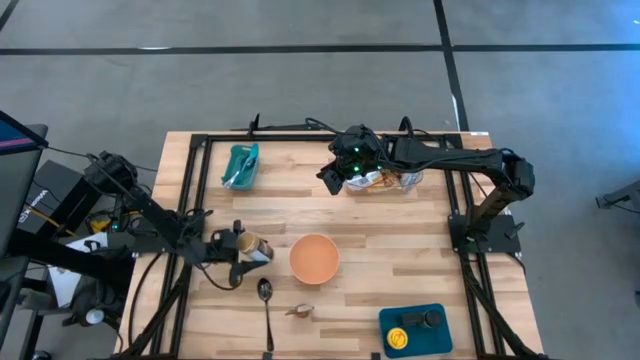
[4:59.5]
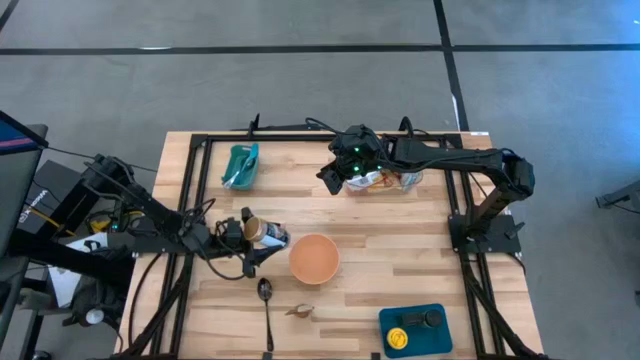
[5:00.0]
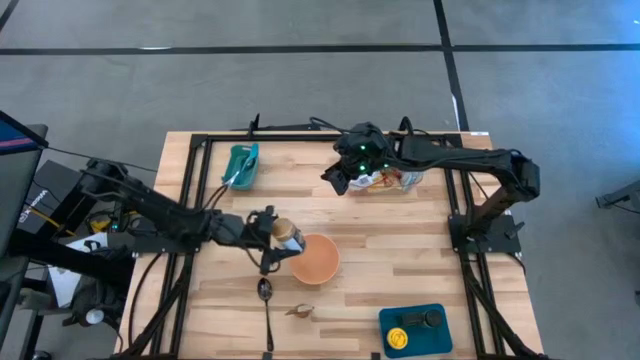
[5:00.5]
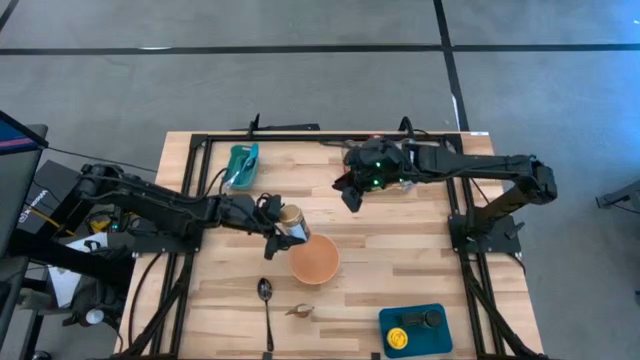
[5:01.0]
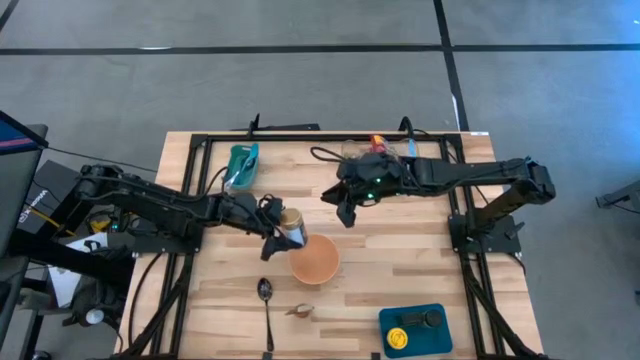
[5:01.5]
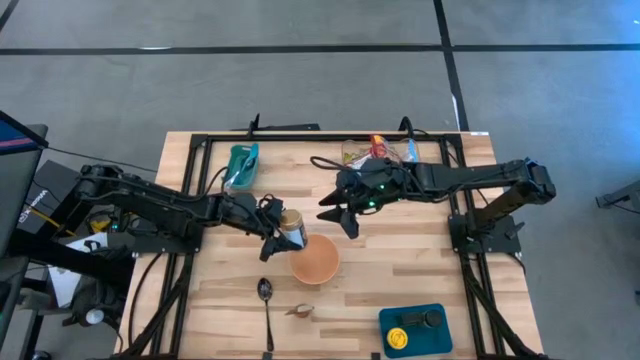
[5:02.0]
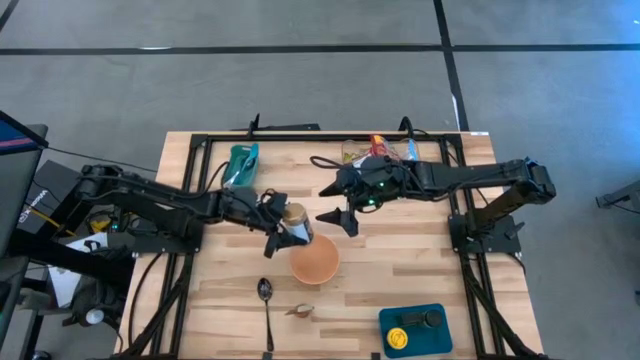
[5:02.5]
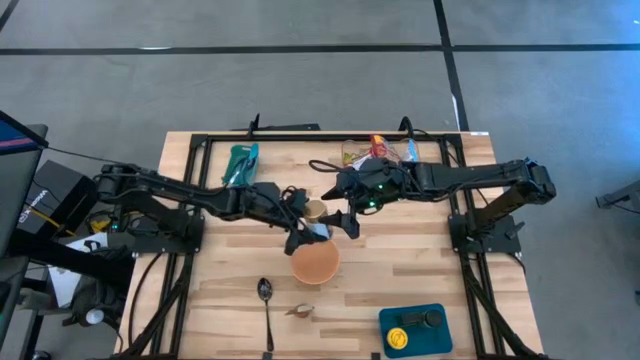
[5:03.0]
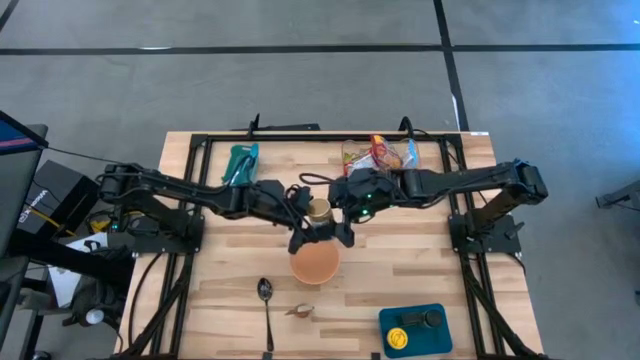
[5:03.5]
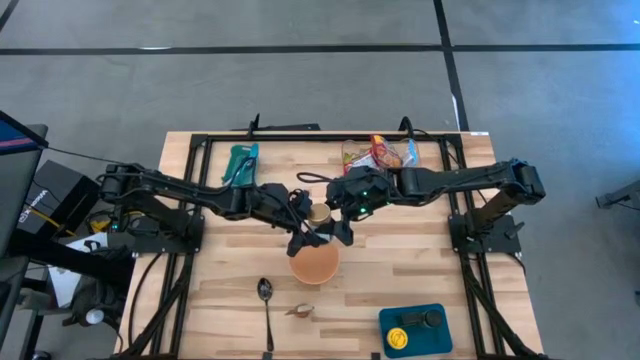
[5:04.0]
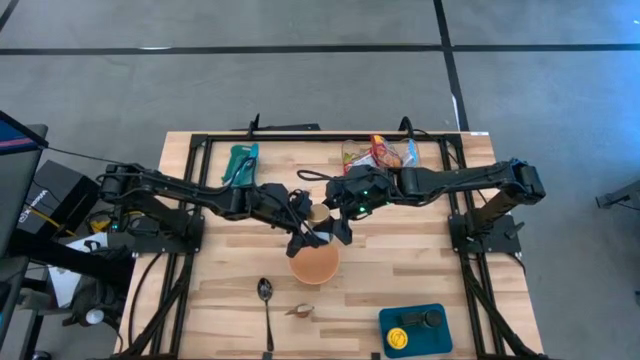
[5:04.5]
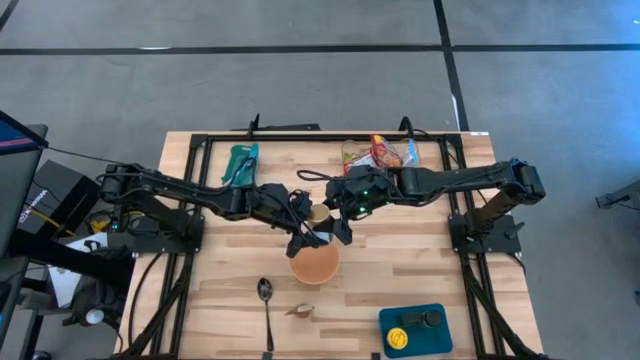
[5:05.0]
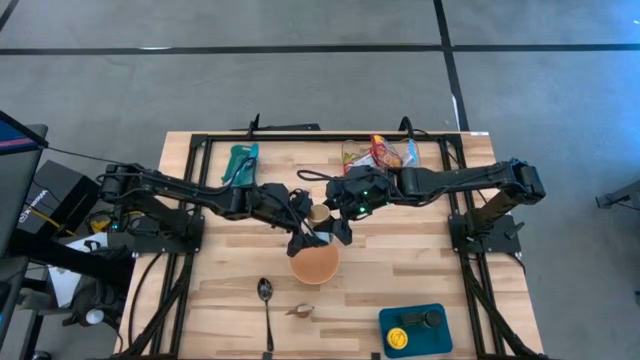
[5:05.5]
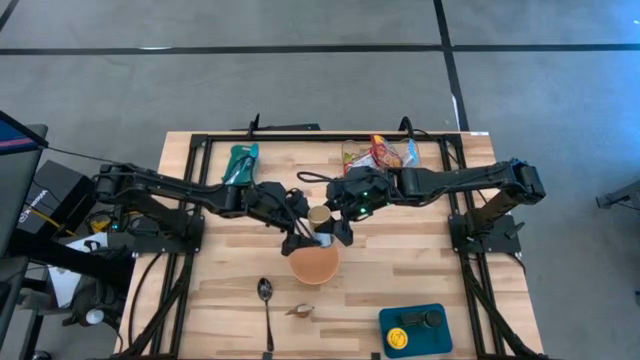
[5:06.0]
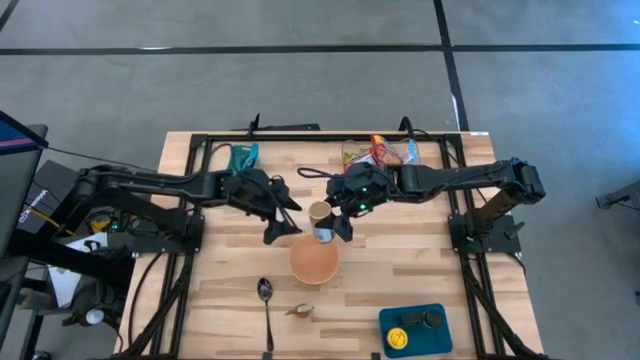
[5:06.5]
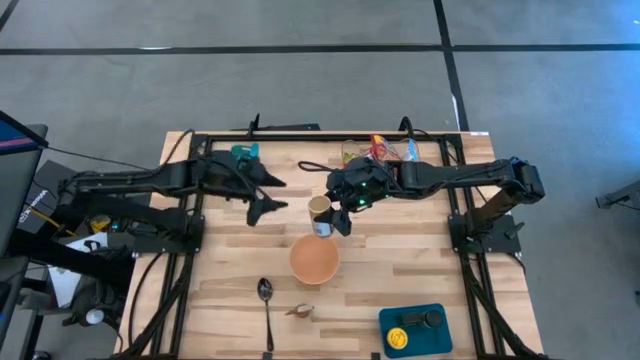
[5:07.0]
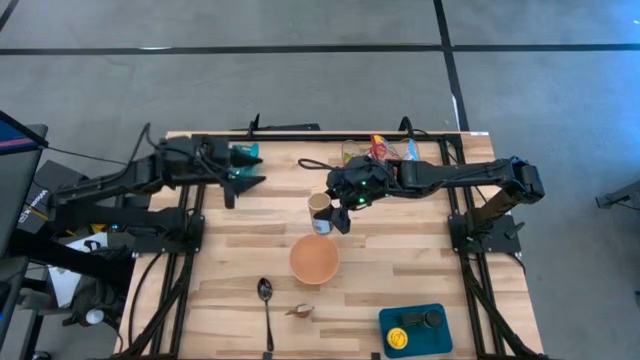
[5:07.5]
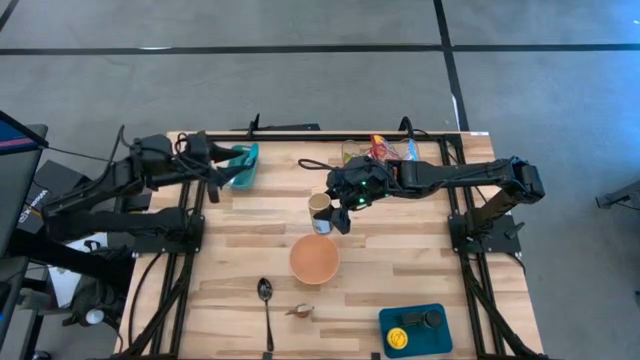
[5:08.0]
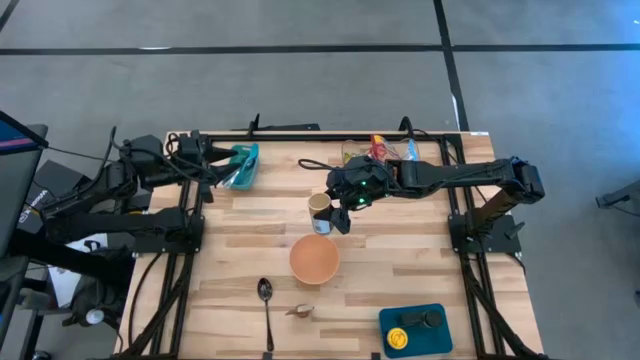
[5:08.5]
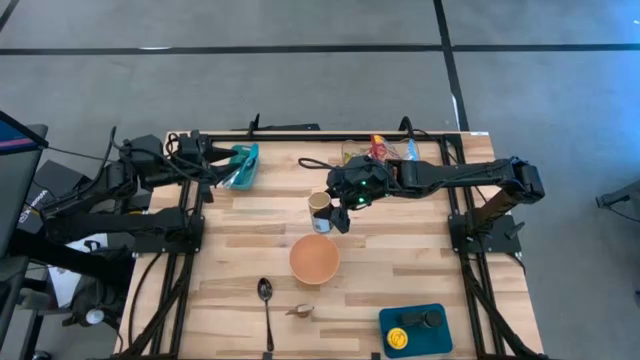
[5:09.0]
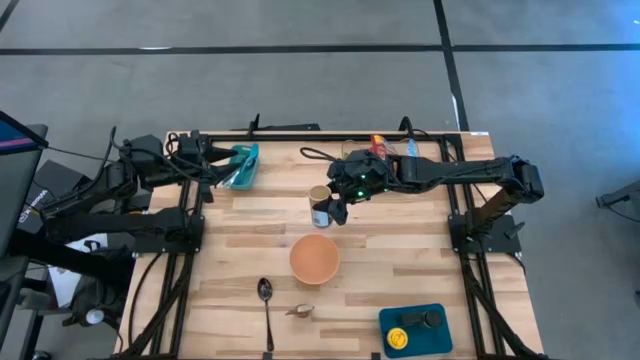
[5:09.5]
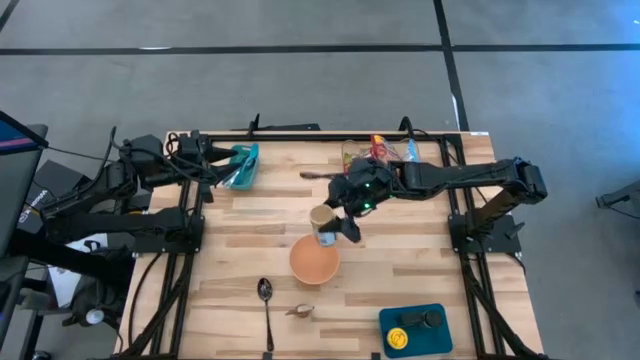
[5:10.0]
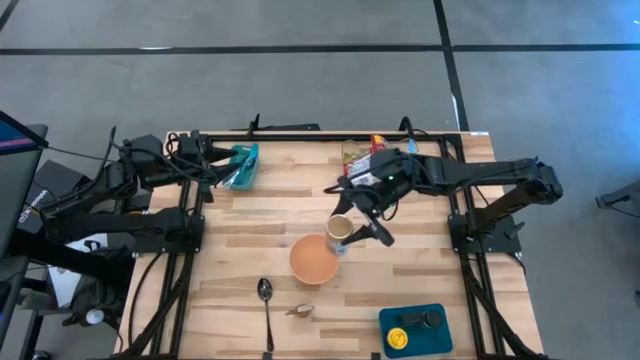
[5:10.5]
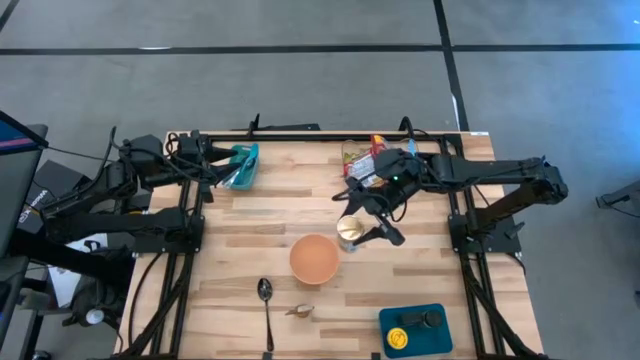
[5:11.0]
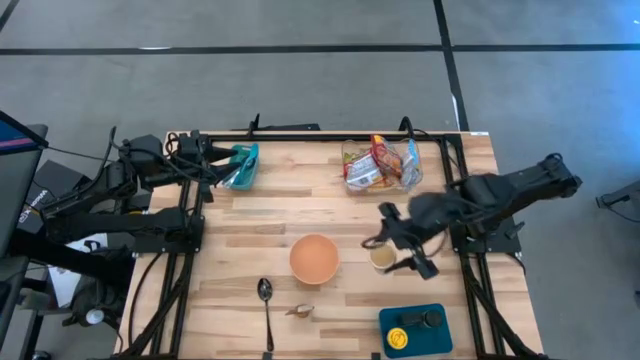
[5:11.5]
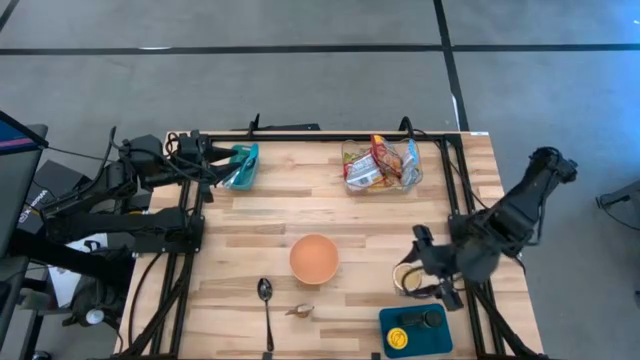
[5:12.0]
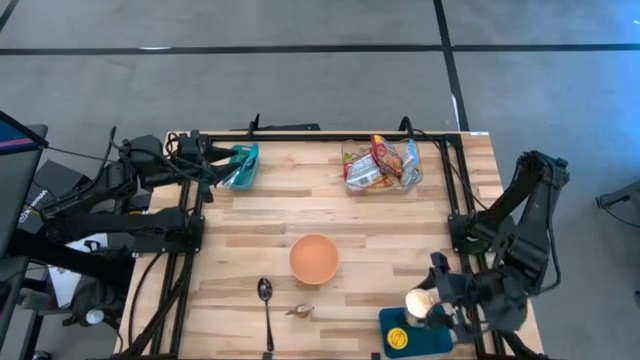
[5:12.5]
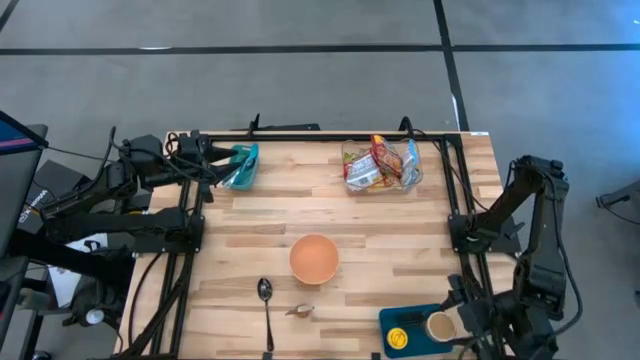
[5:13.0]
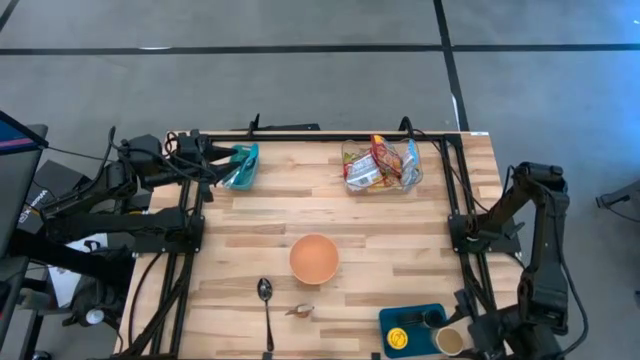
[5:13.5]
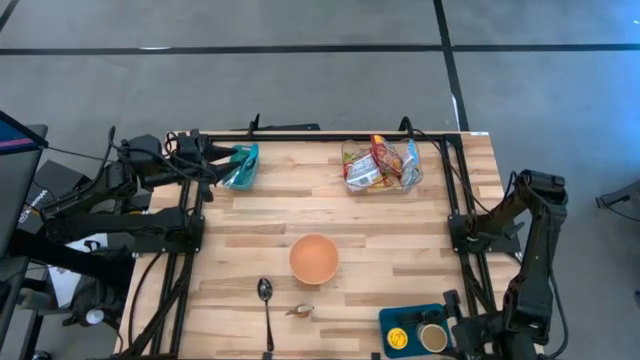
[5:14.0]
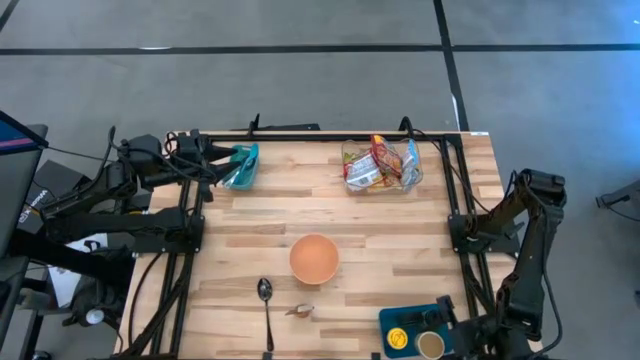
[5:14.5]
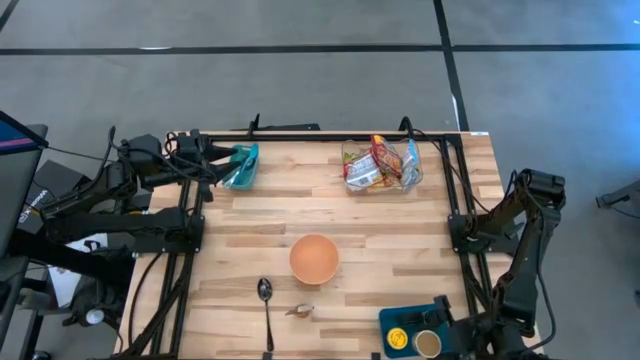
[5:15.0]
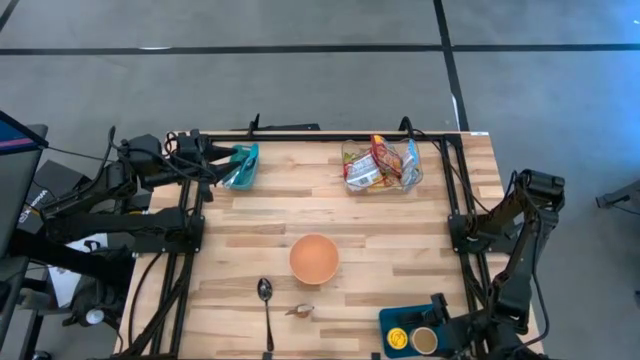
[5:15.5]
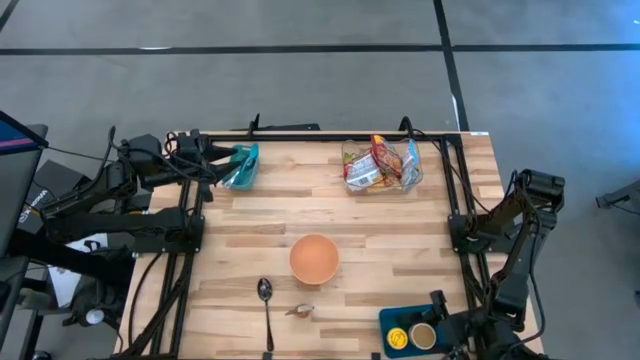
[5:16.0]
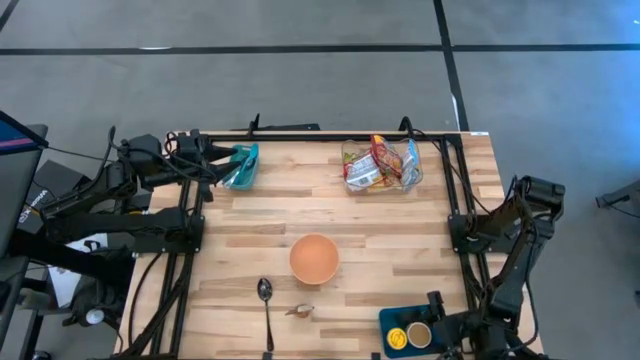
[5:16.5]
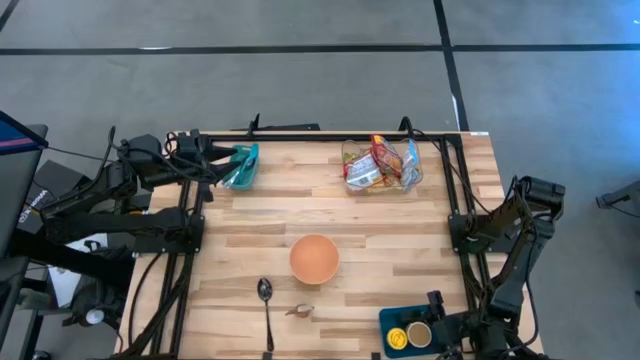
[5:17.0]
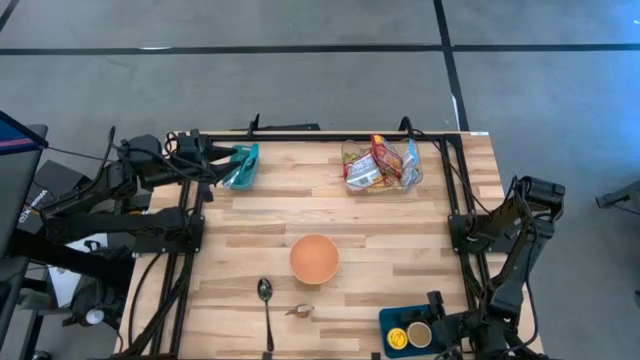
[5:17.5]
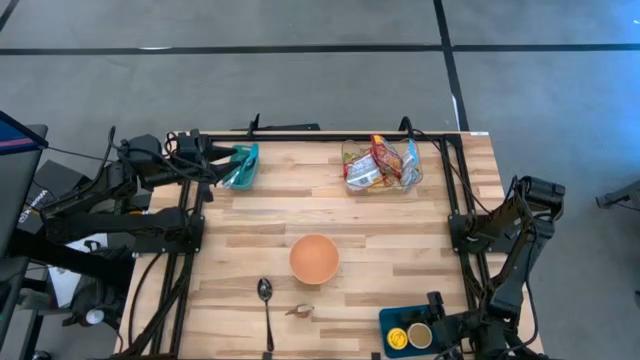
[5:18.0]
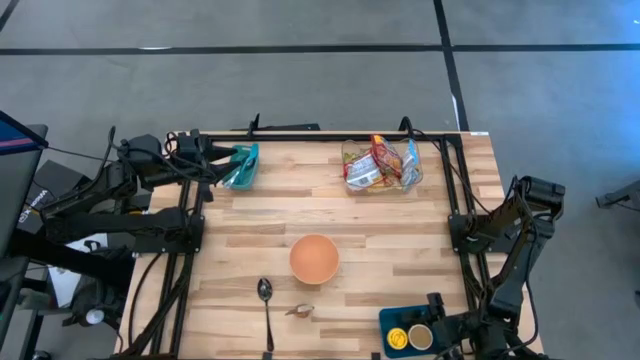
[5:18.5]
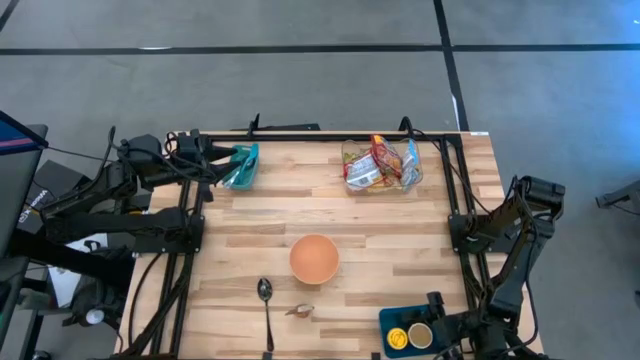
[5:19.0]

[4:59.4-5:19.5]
Task: Pick & Place Food Item
Put the golden seasoning bottle into the dark blue bin

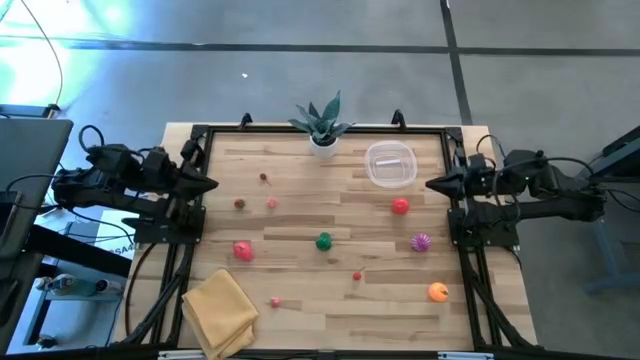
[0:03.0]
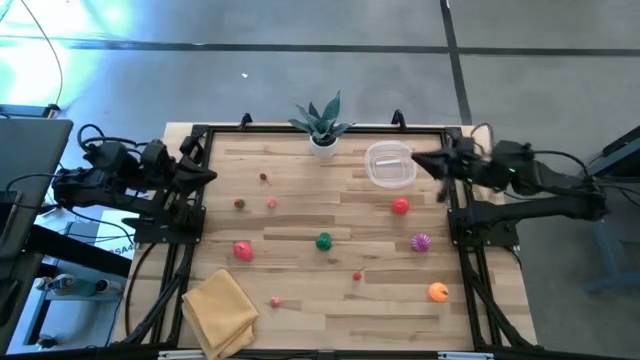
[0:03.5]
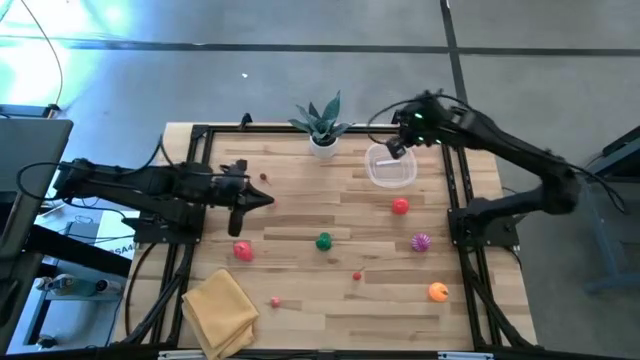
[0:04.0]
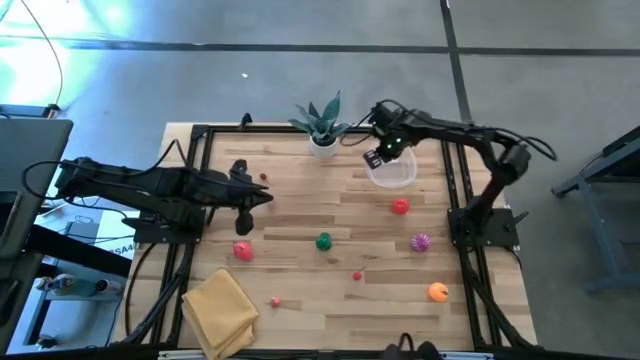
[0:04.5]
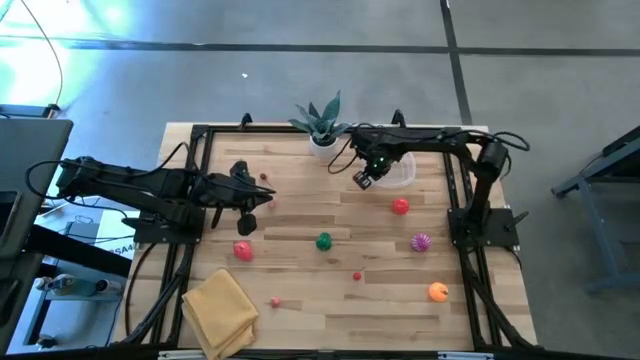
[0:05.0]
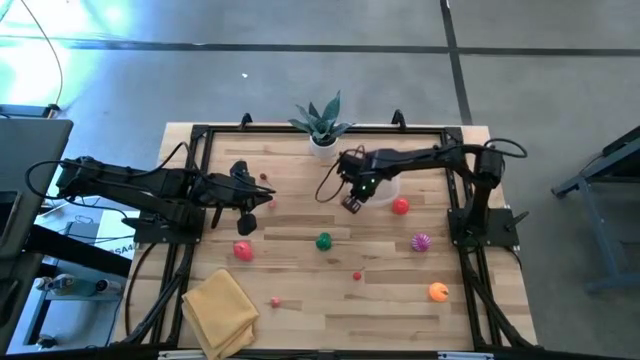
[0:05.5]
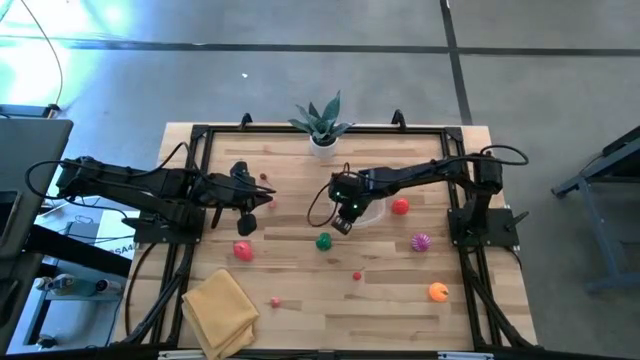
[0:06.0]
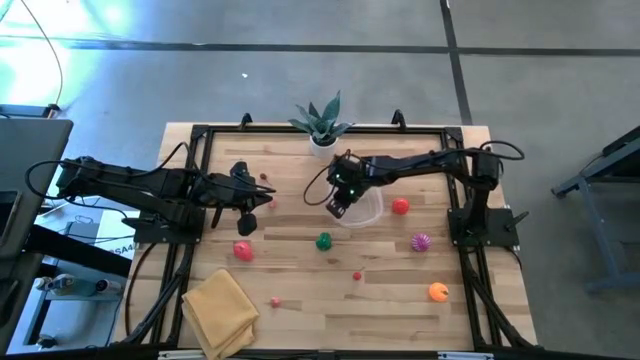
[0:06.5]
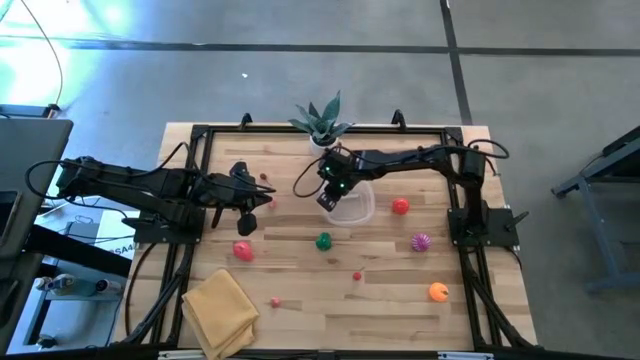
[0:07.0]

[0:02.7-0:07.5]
Task: Pick and placing Produce into tupperware
Prepare the transparent container
